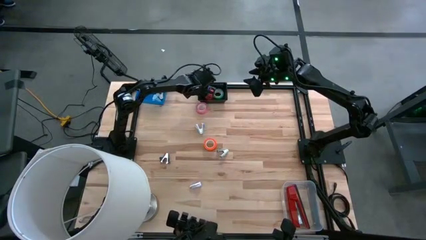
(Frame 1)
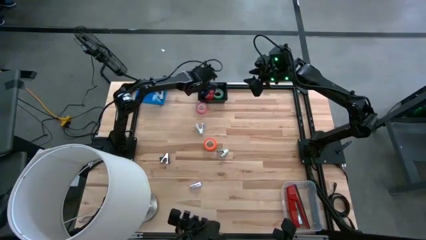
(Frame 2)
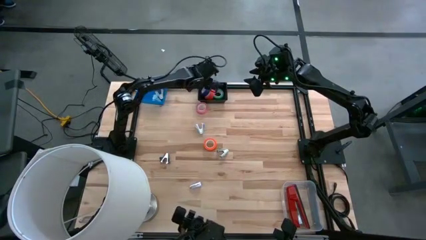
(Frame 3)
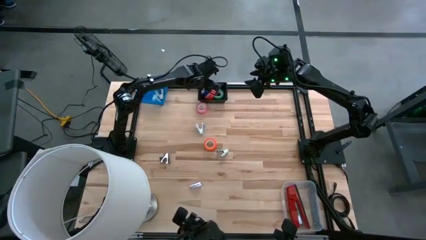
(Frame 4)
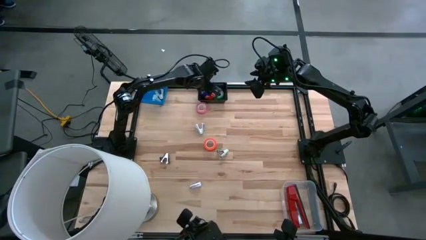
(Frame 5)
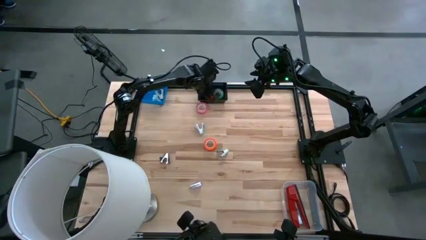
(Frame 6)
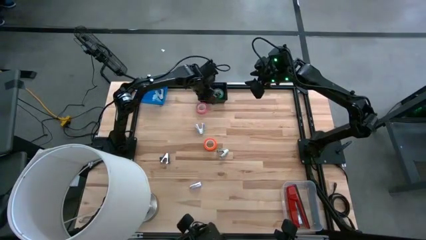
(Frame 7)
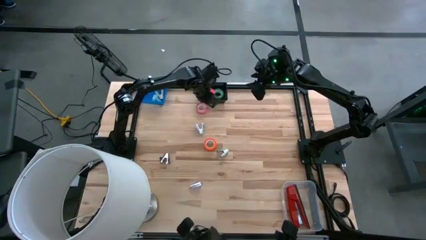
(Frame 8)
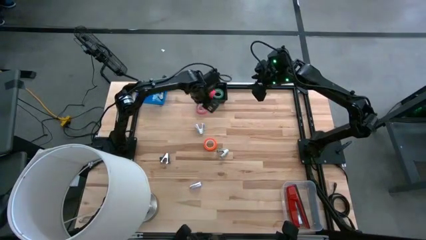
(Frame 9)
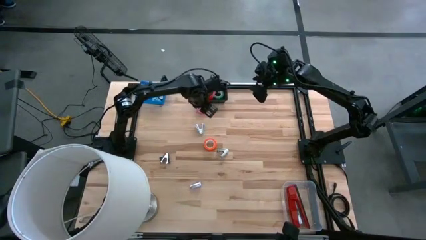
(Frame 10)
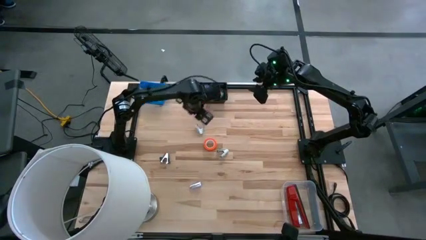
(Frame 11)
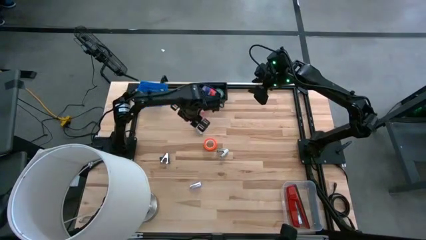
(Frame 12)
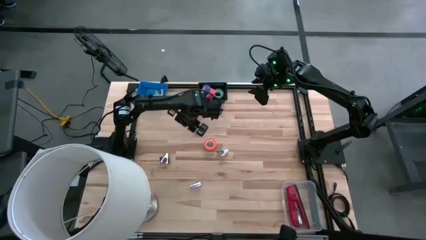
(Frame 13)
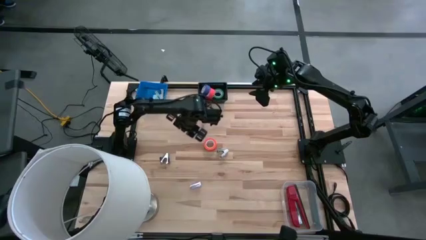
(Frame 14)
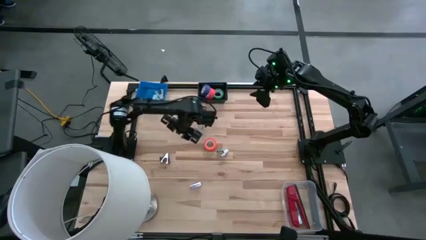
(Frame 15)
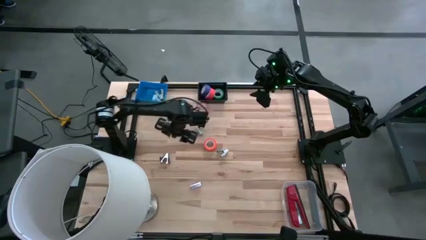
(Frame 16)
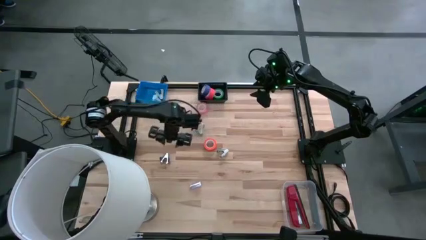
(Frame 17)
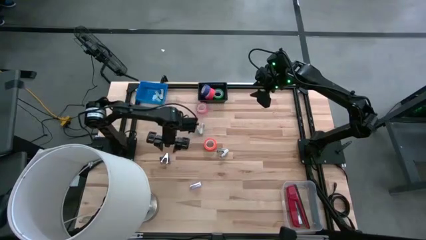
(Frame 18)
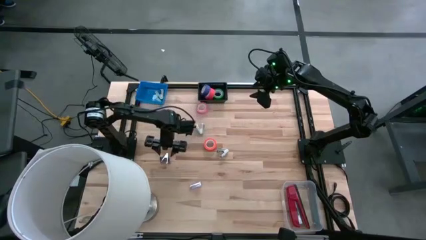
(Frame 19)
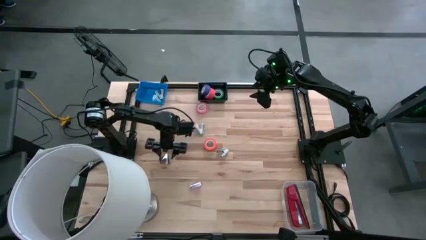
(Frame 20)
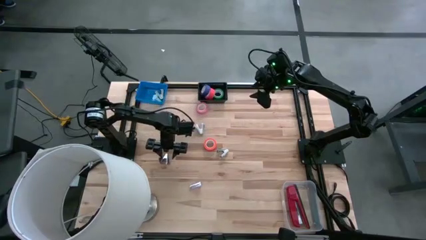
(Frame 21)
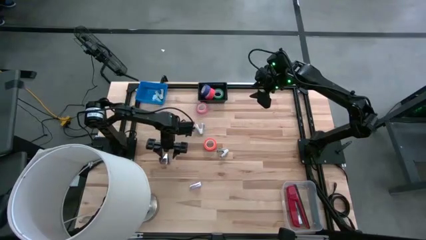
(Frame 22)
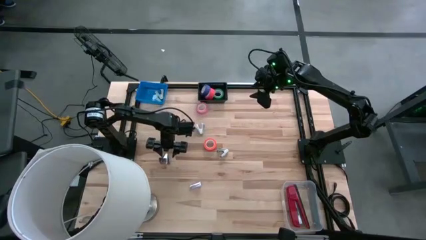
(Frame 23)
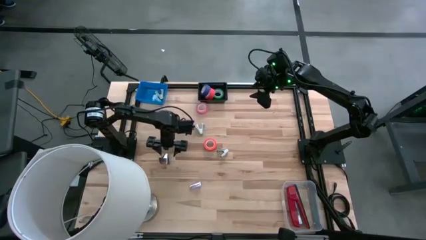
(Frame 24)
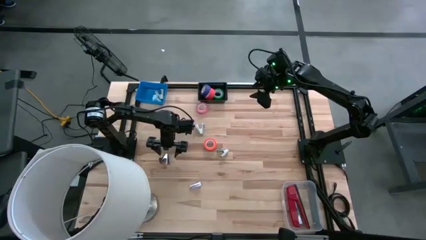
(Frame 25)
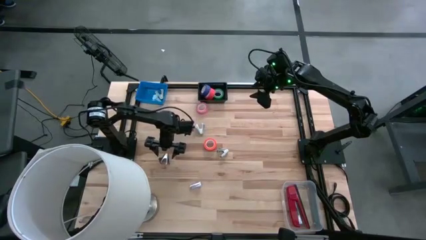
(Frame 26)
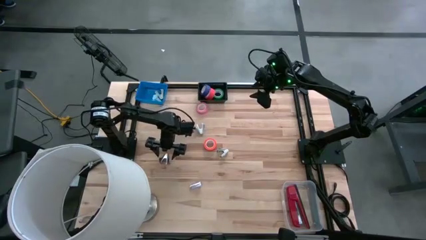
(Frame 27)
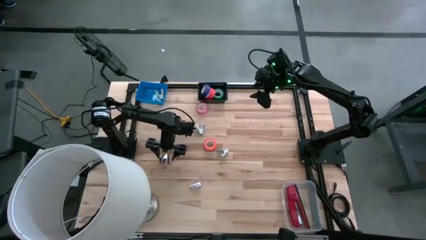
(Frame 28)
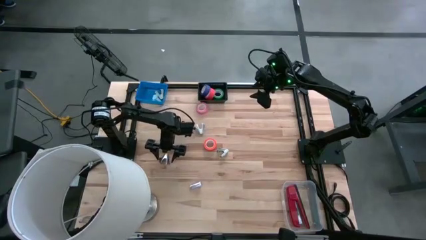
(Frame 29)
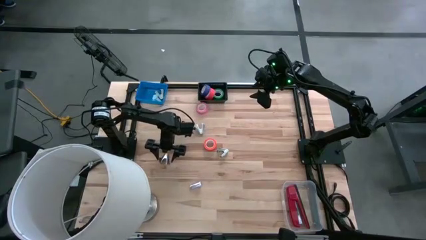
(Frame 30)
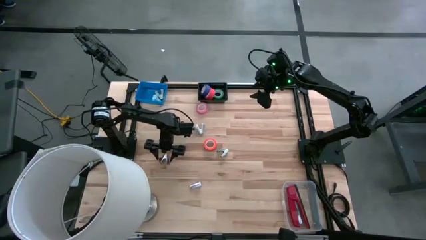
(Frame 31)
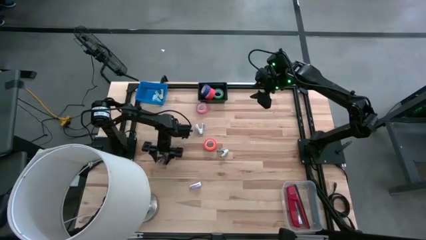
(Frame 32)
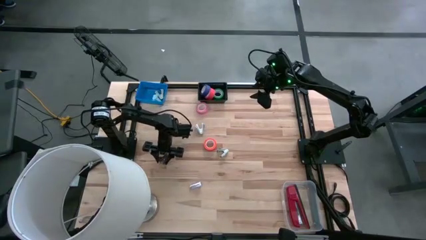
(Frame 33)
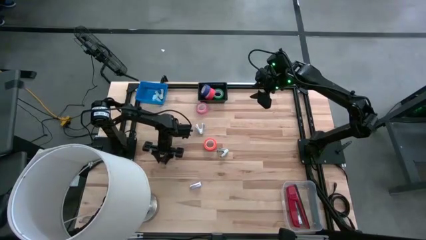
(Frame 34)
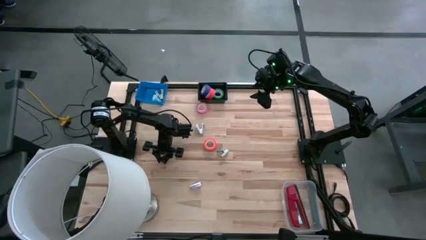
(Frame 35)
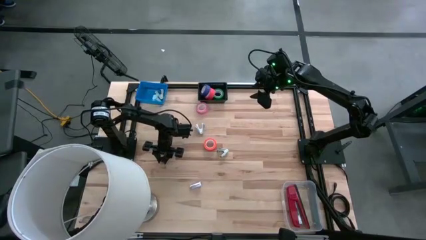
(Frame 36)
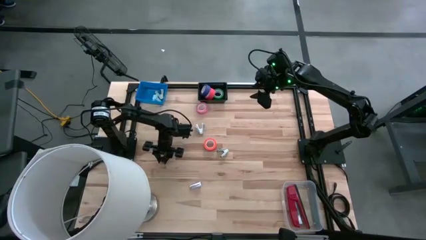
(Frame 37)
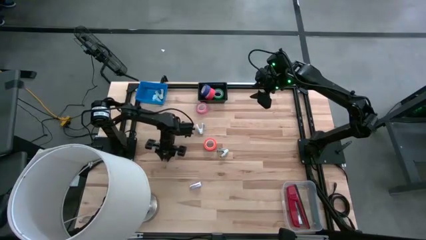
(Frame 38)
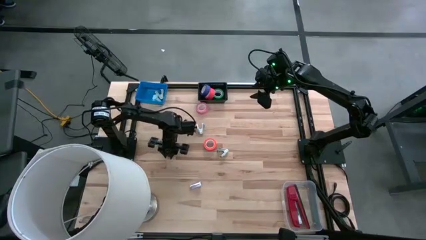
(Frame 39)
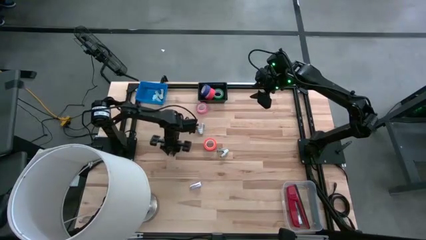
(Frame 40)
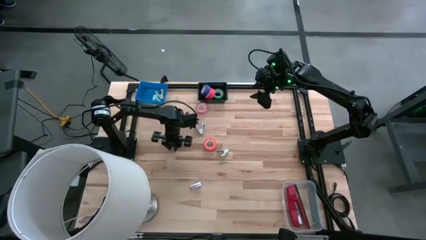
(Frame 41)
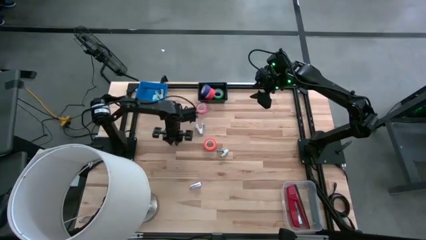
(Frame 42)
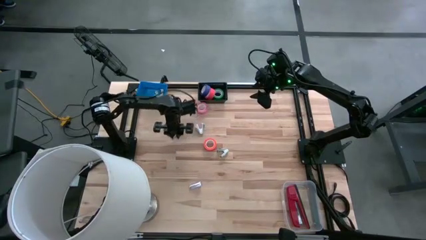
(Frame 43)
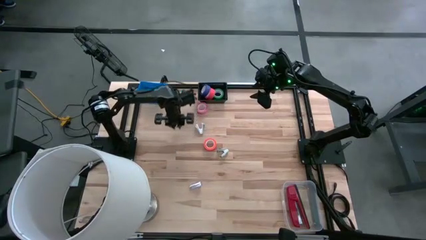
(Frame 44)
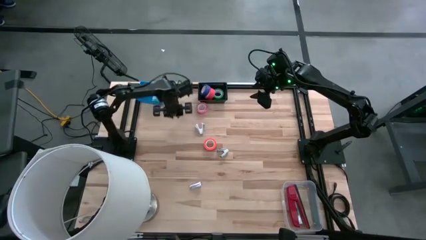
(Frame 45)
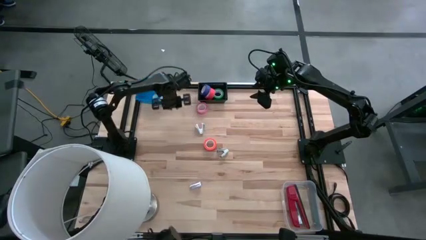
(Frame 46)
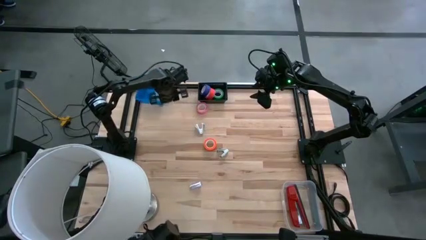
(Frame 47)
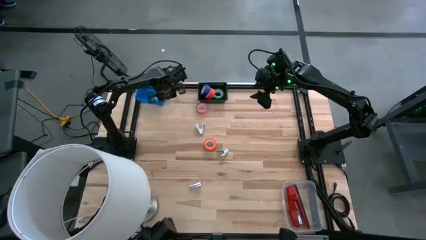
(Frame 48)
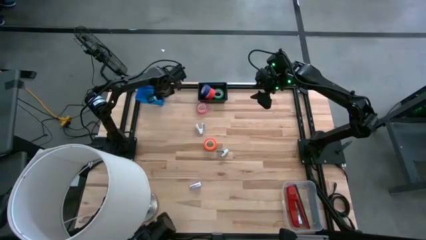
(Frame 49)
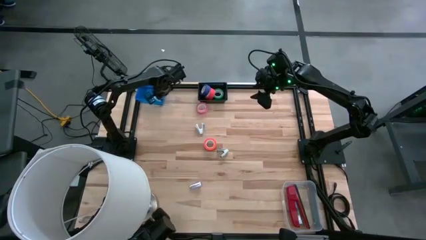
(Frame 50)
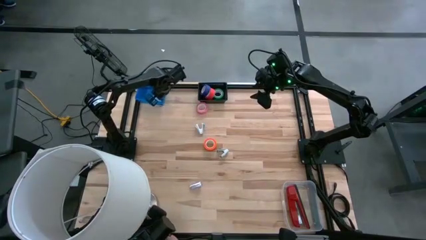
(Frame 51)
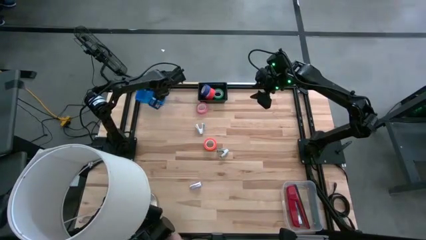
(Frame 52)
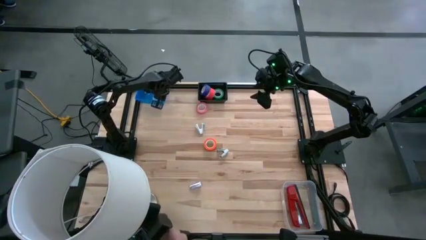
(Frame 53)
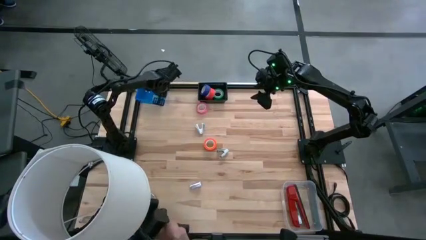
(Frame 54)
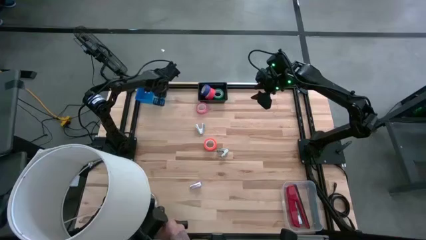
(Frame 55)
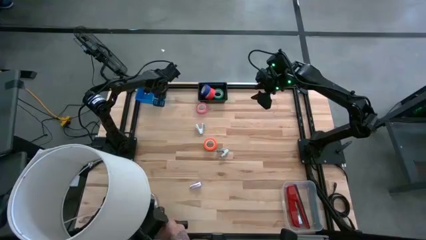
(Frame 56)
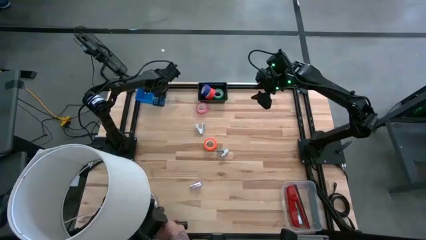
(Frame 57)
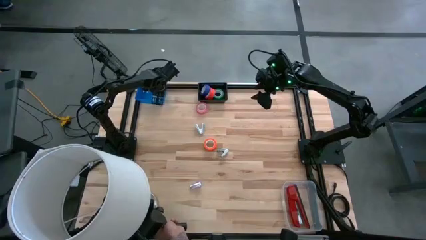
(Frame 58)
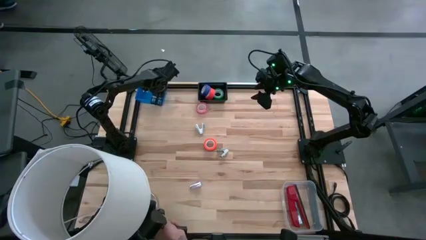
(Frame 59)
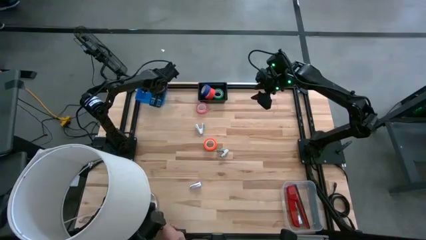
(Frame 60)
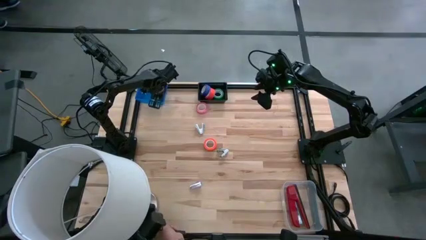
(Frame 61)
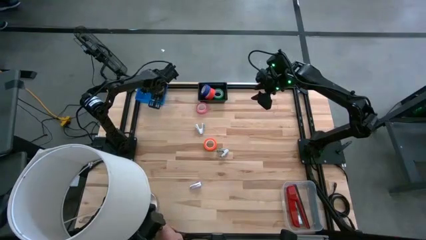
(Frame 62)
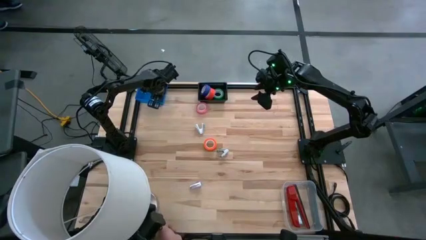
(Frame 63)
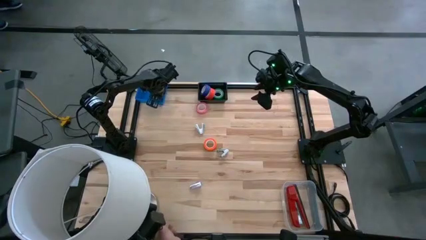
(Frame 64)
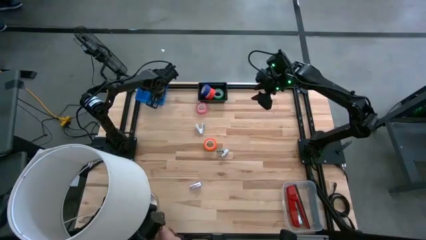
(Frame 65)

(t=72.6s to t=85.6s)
Task: Pick and place Stapler, Stapler remover, tape
Put the black staple remover into the blue bin

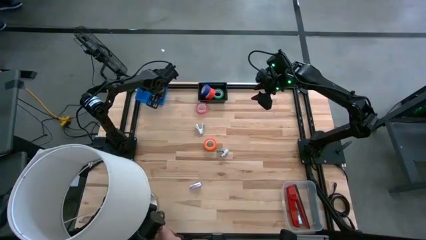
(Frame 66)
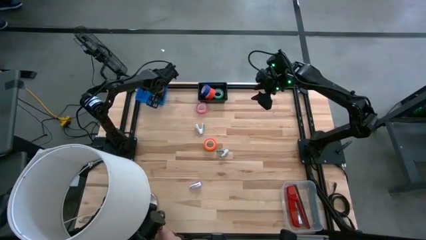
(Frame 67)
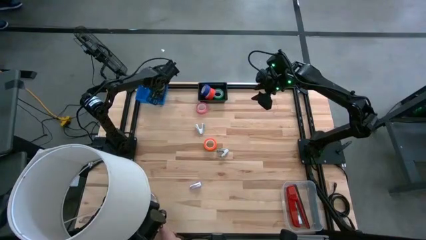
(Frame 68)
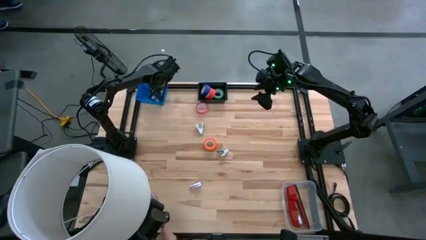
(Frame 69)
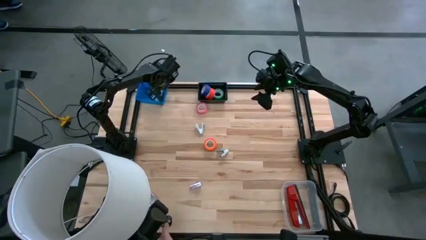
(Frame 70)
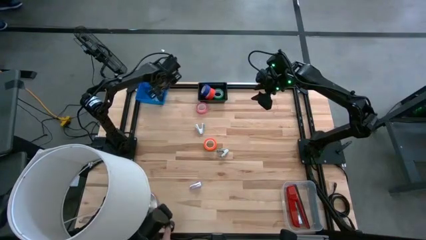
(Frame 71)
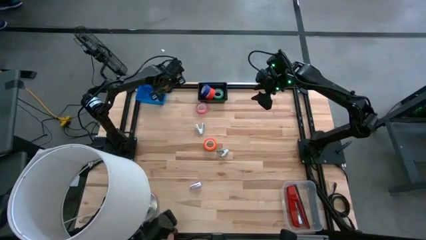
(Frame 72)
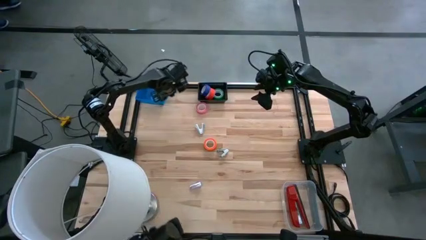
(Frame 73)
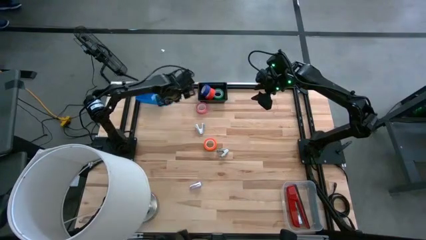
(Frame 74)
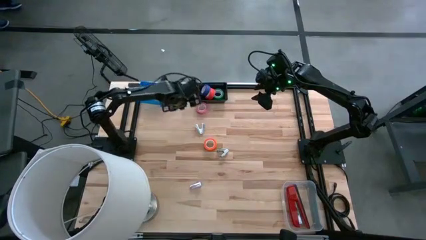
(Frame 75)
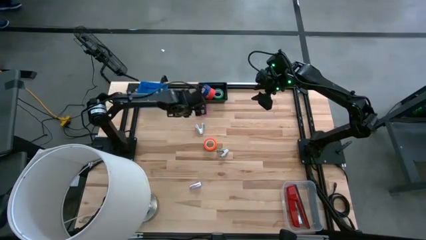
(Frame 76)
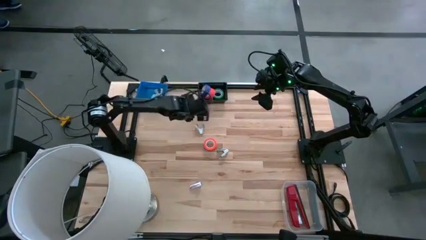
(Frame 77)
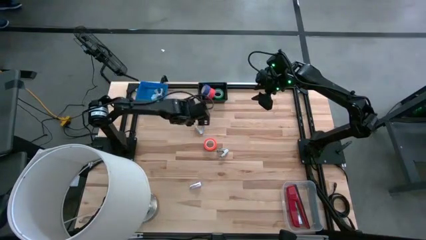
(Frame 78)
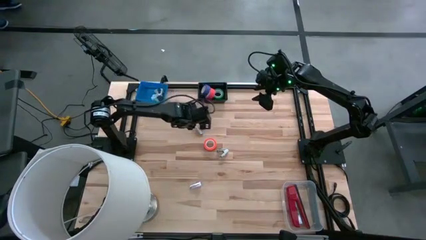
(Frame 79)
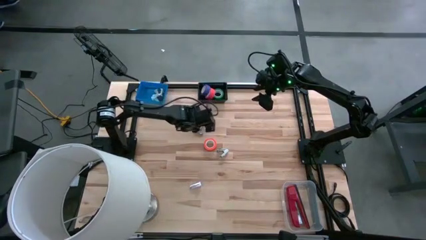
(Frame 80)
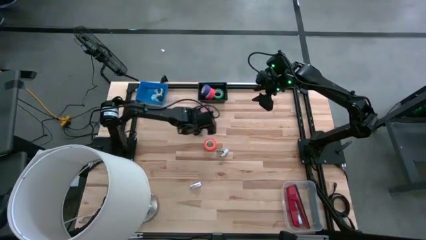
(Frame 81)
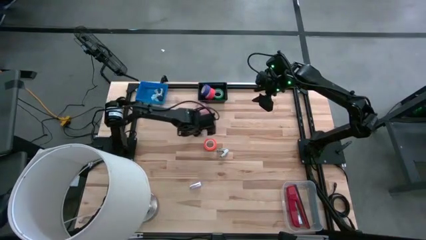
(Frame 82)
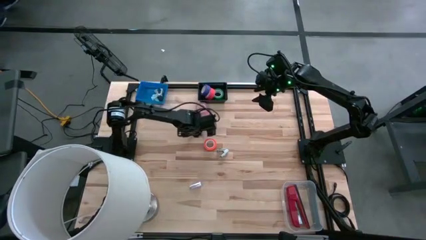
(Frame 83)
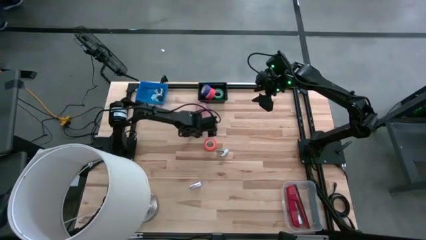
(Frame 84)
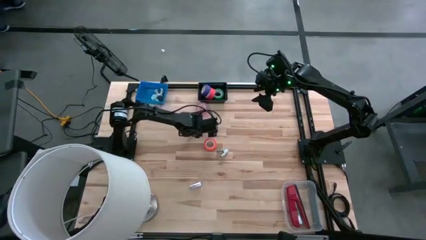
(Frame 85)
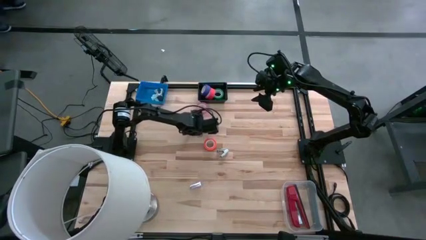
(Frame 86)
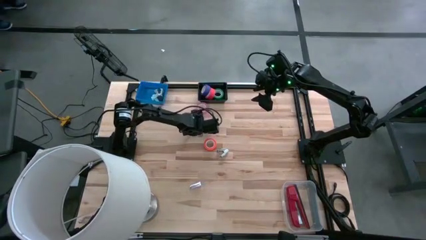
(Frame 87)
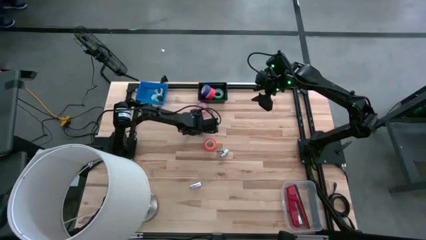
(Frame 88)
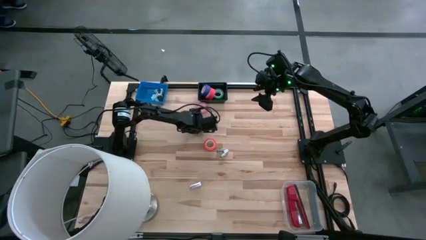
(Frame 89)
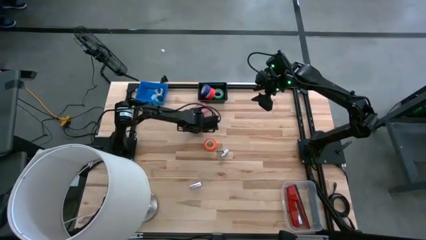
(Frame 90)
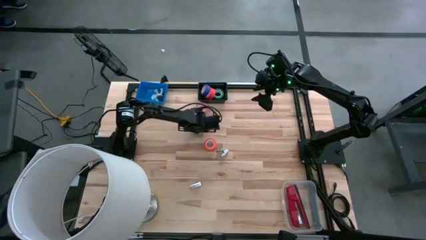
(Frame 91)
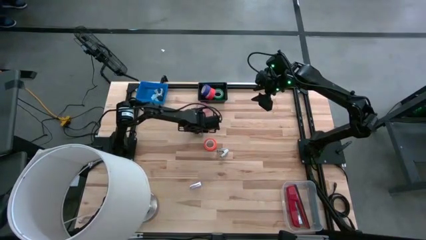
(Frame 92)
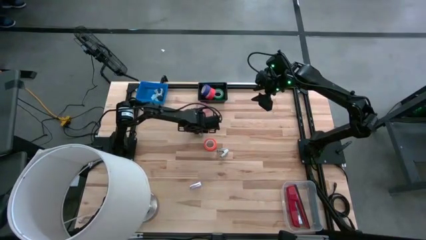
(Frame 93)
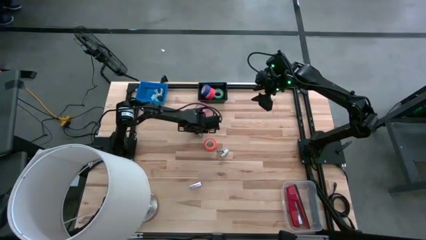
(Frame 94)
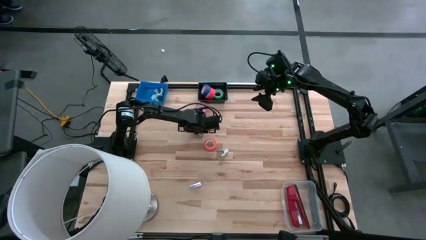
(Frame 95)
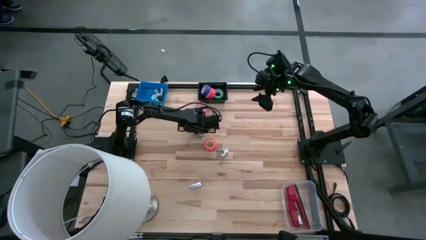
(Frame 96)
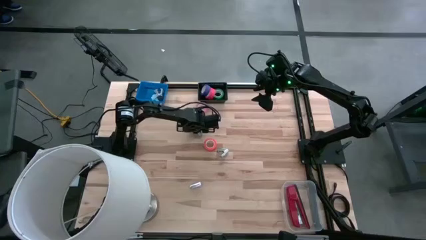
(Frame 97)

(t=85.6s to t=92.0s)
Put the light blue staple remover into the blue bin
